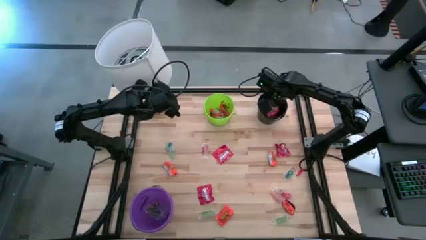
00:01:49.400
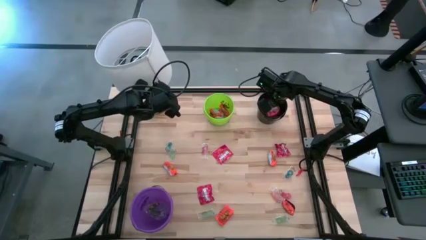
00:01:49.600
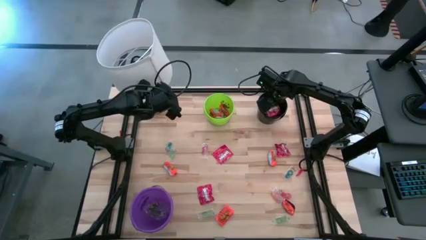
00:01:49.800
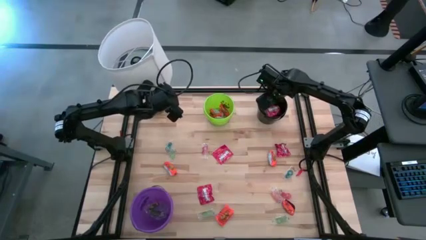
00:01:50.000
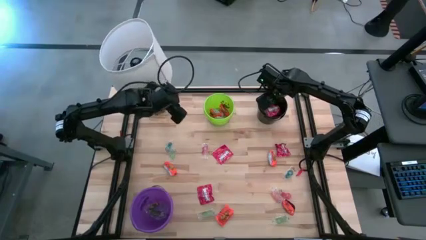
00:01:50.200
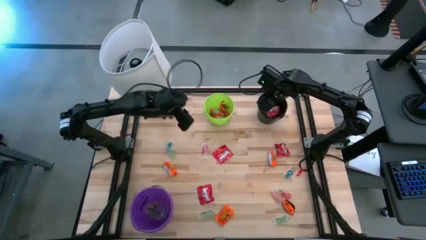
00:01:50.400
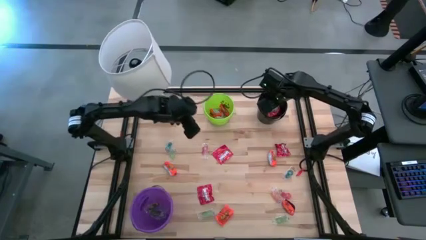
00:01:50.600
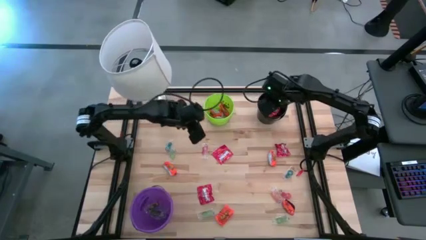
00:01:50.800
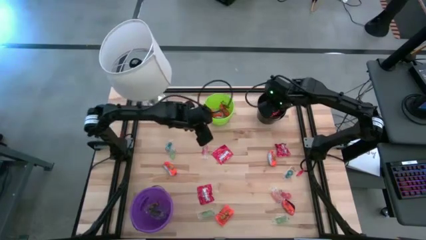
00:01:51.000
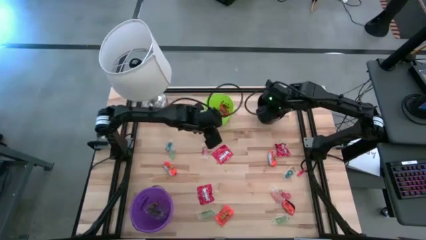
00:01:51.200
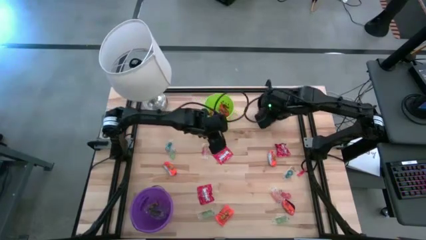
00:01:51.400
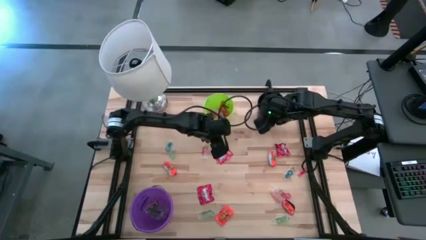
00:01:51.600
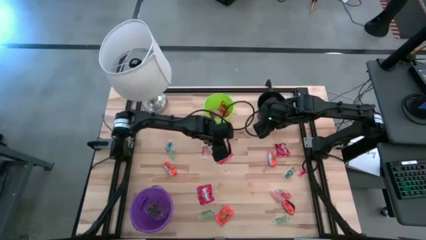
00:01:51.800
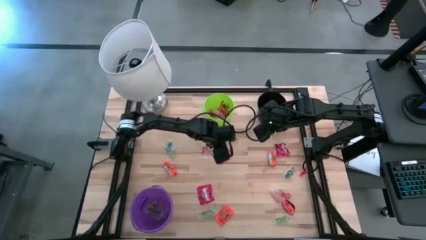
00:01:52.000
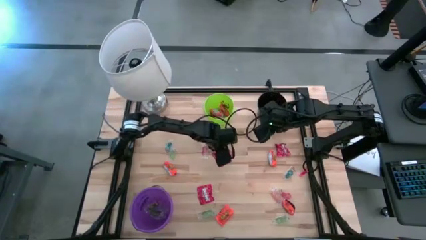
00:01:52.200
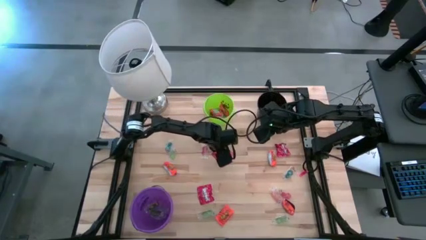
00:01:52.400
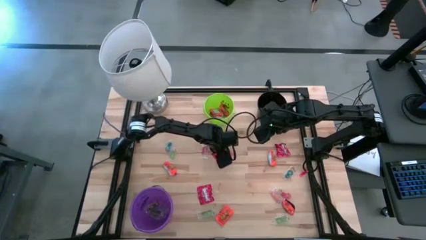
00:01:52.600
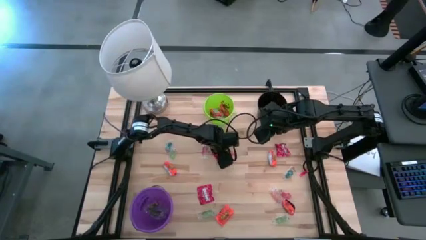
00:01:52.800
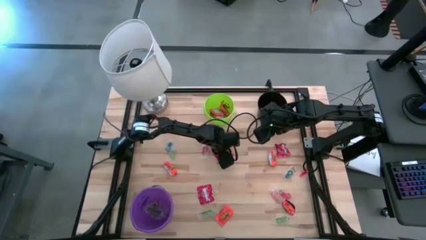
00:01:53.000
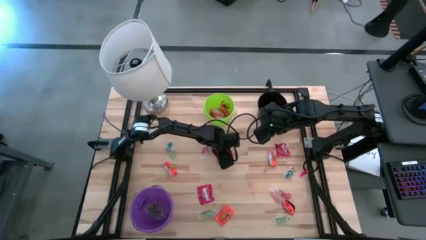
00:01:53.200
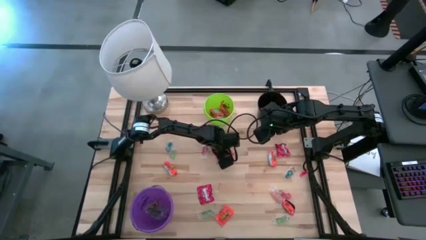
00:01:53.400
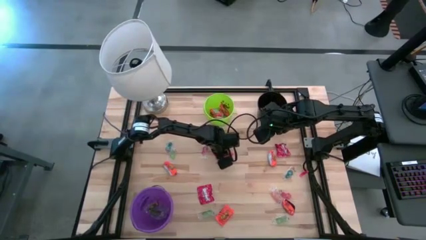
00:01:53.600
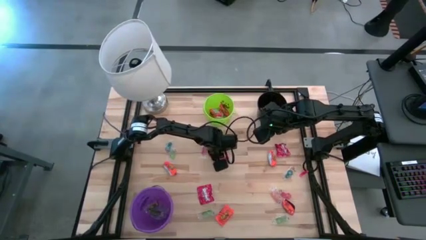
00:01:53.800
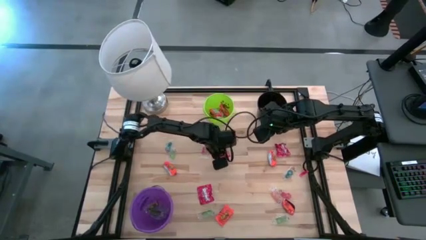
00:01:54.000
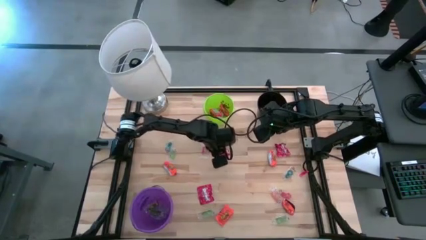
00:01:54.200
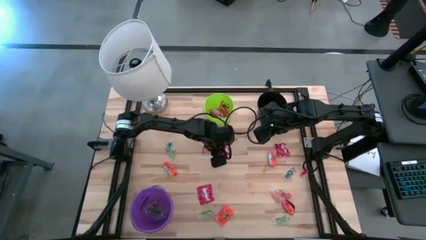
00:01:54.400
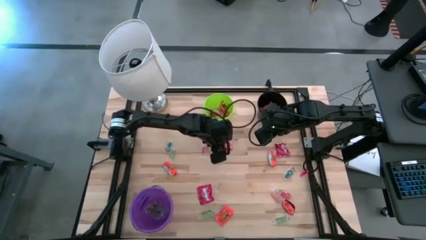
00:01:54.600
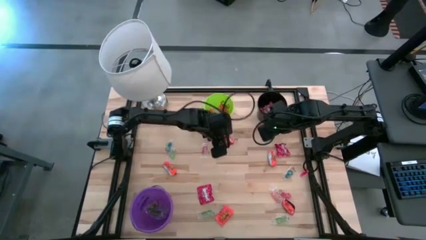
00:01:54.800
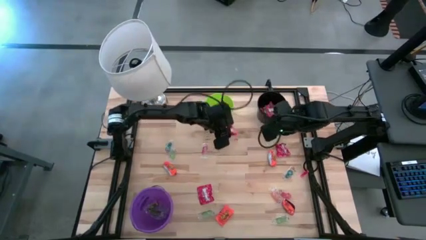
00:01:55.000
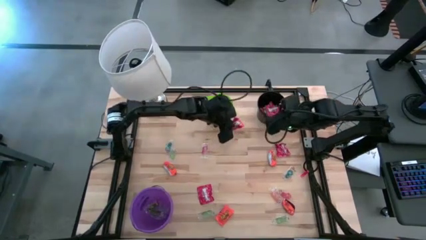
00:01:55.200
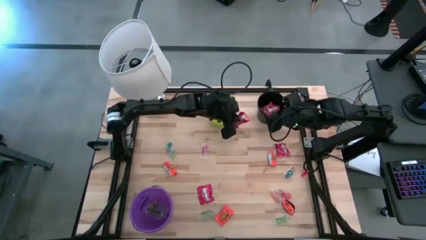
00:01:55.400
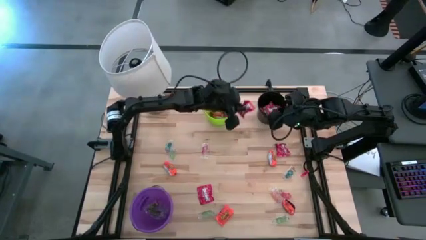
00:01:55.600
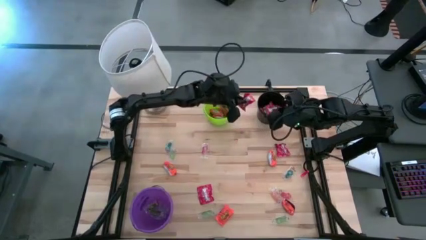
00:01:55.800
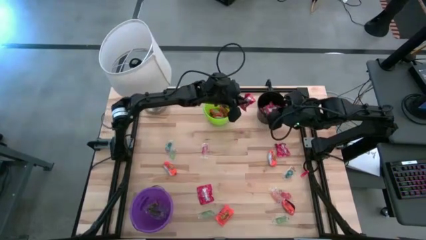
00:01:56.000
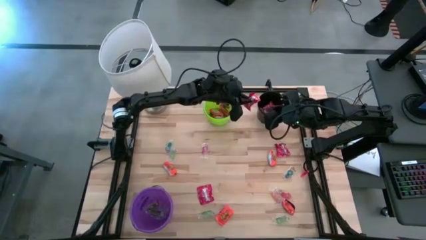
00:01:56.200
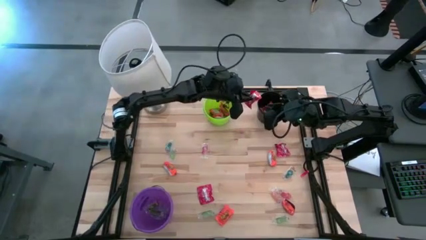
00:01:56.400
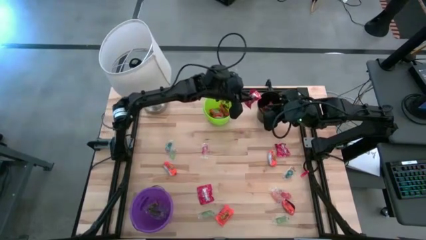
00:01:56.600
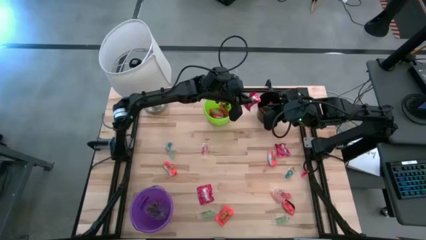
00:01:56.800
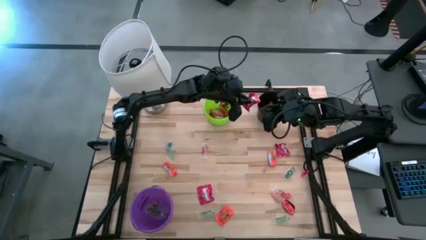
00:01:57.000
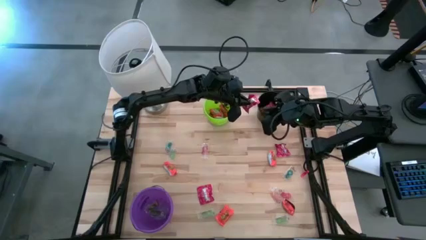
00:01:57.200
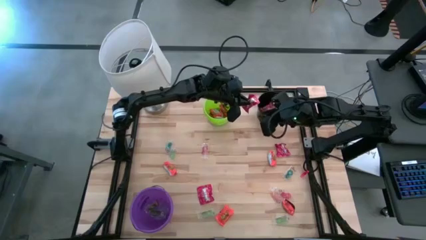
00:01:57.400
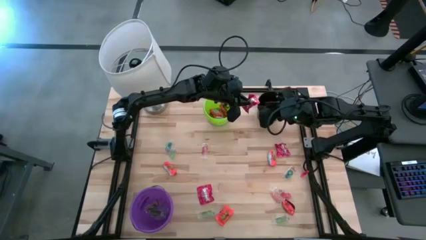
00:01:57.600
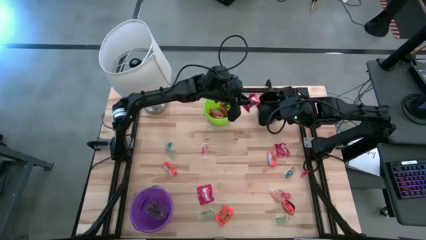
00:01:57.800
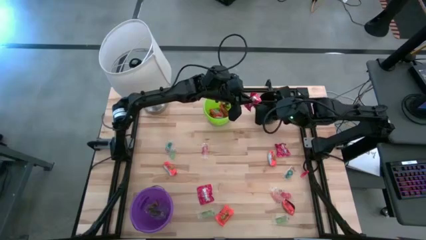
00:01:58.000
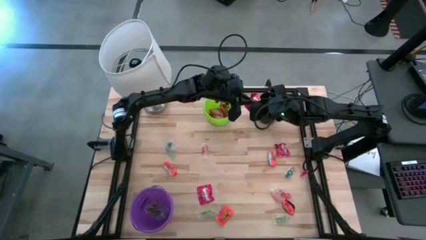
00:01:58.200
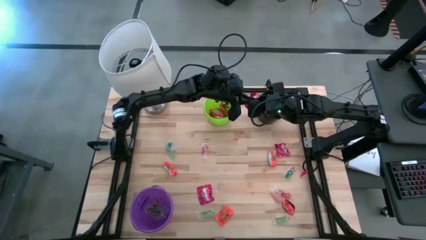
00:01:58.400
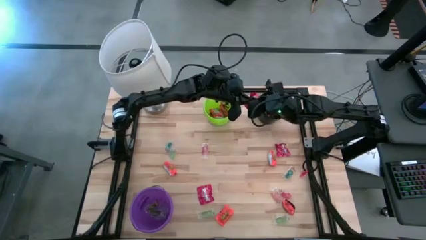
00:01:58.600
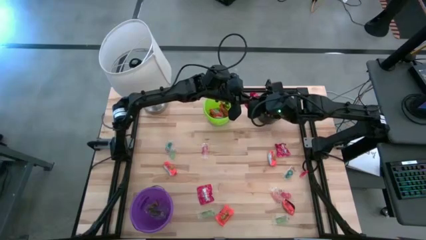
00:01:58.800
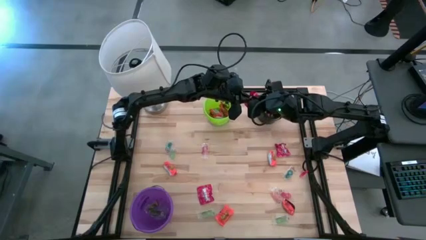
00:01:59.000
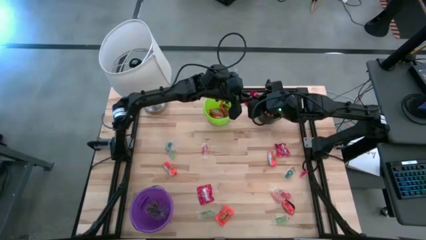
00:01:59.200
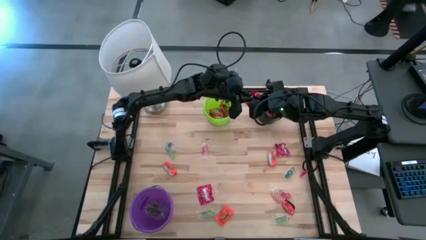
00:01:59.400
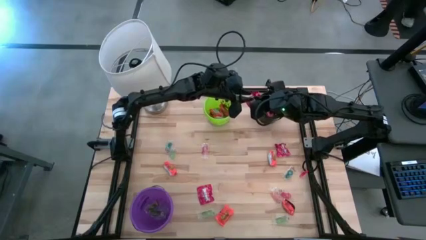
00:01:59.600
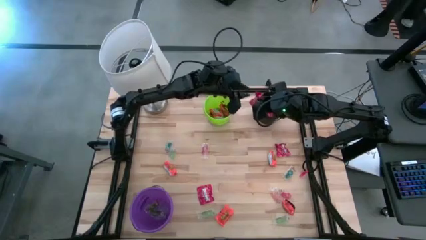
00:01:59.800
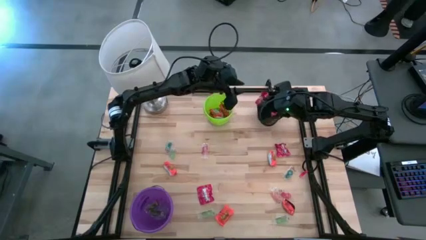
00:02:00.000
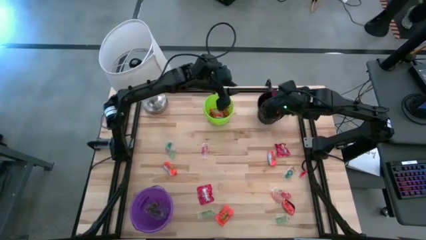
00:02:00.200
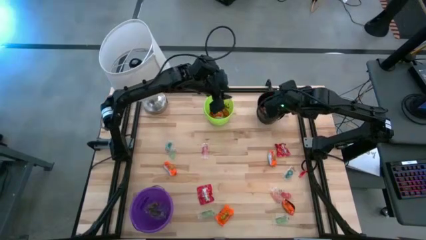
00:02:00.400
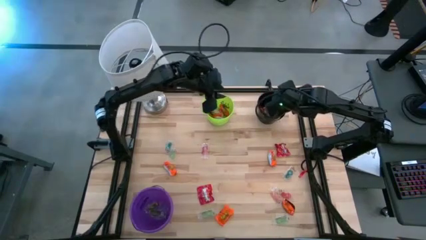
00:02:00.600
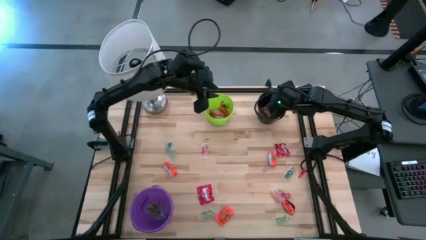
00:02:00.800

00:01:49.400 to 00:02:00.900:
Task: Sort candy
Put the red candy into the black bucket

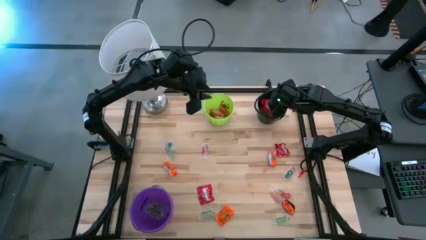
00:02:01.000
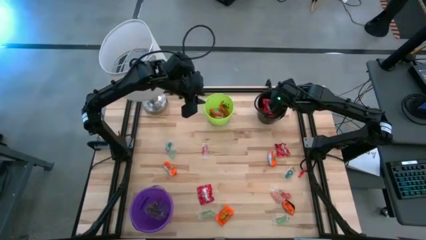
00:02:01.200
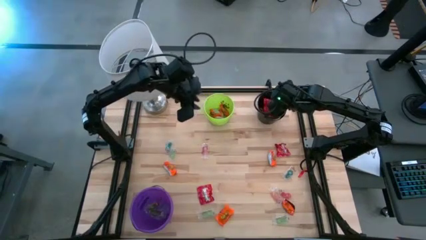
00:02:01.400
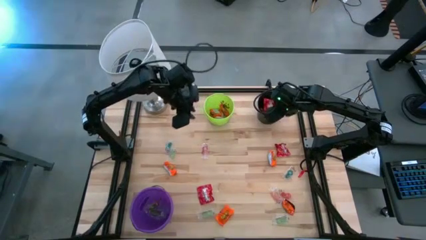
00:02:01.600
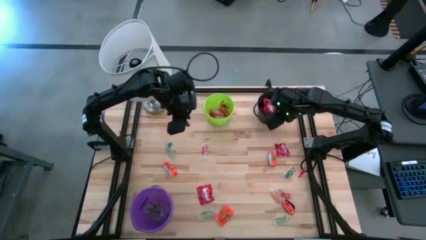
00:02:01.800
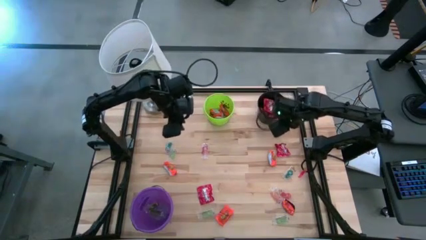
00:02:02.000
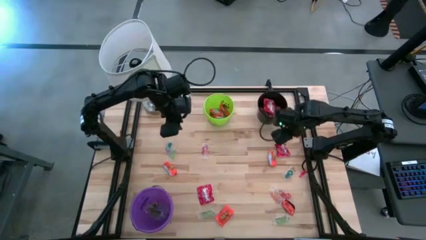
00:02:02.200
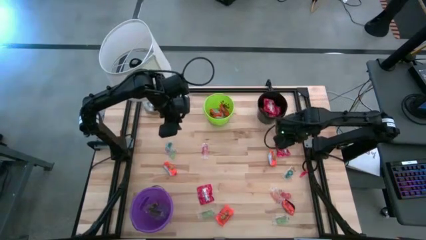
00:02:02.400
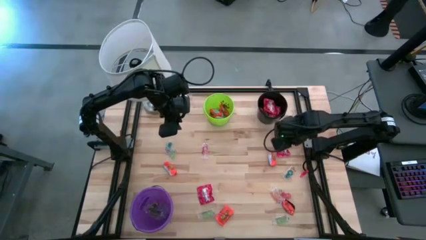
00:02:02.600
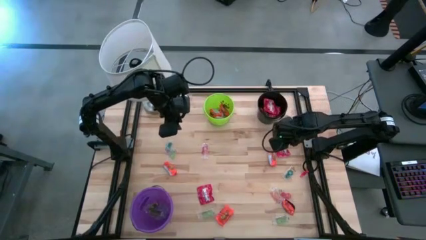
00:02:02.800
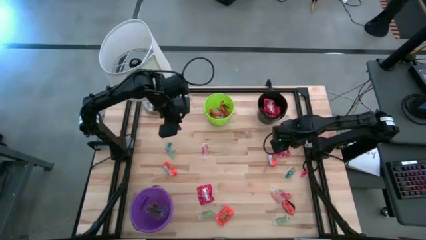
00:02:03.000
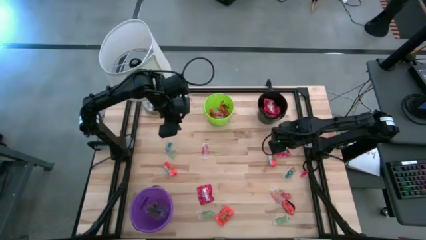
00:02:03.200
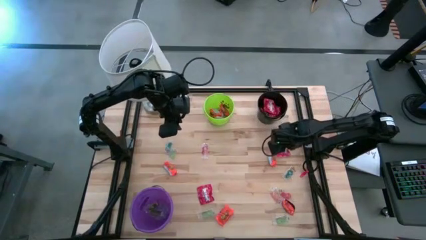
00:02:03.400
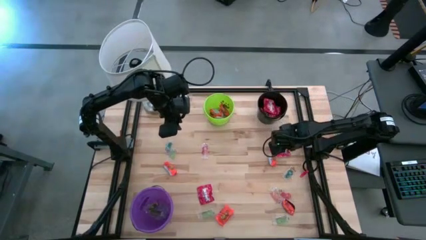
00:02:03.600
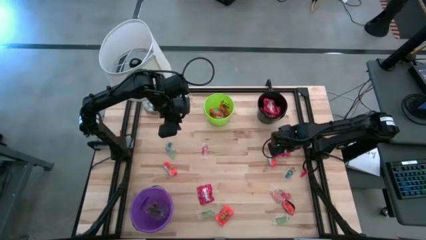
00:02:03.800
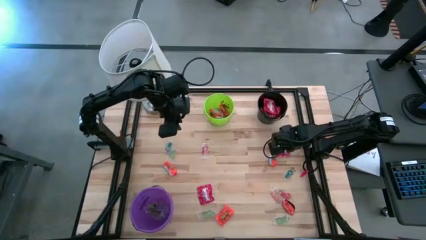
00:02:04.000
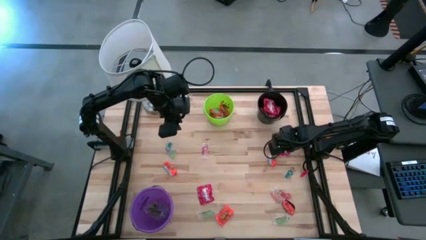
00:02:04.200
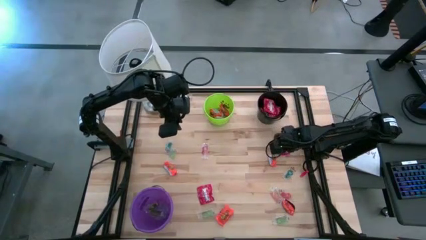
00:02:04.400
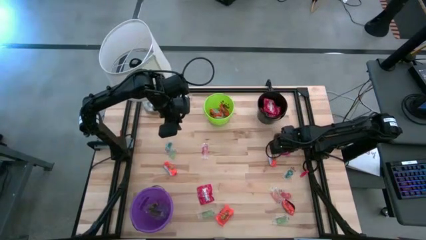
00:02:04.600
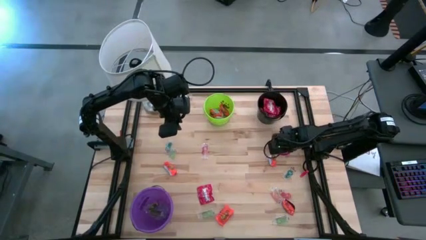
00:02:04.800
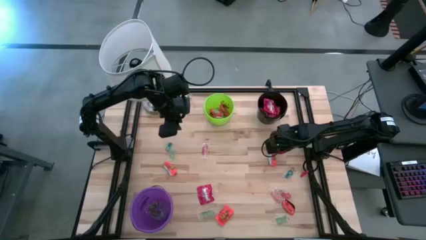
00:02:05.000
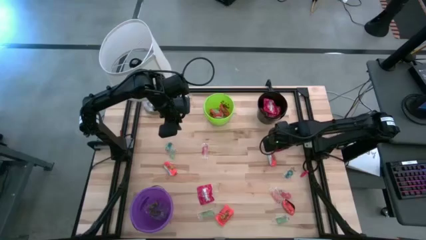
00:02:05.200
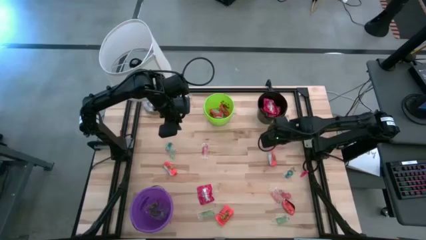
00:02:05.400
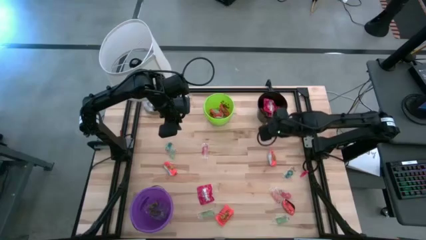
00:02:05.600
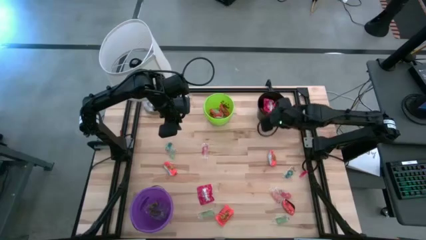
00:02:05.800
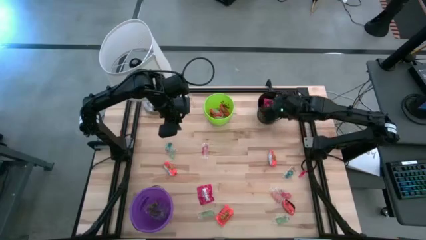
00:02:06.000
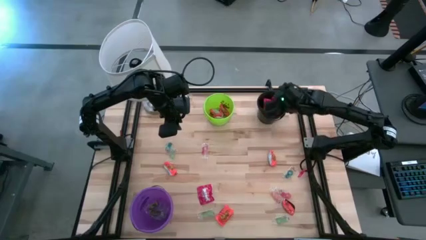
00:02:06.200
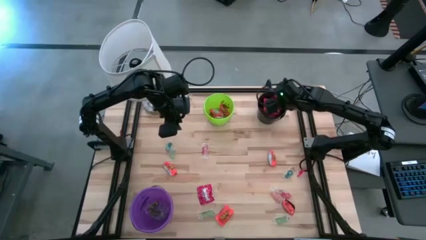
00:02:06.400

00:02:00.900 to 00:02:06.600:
Put the red candy into the black bucket
